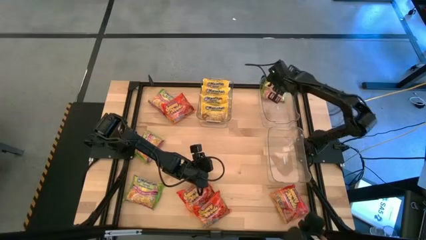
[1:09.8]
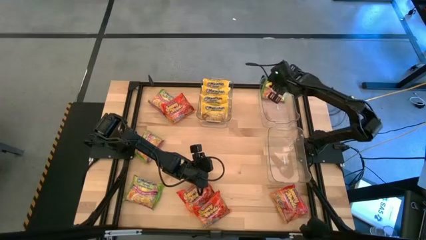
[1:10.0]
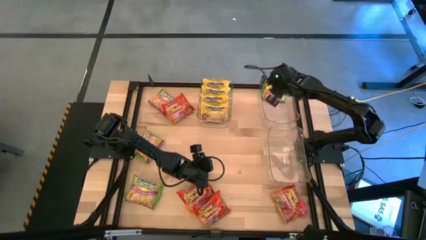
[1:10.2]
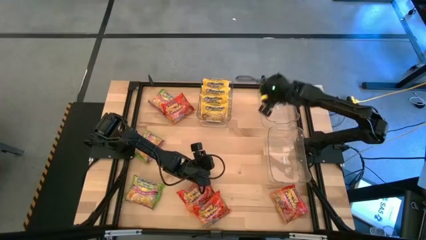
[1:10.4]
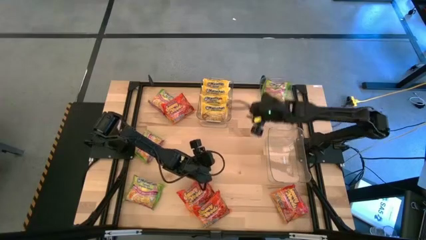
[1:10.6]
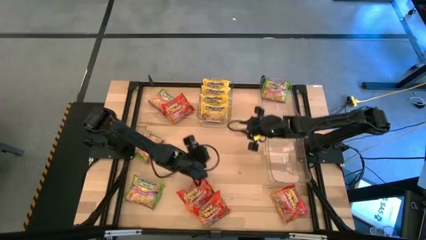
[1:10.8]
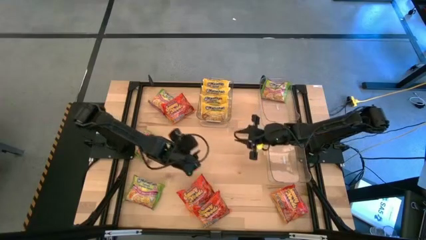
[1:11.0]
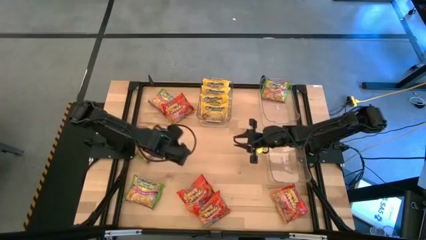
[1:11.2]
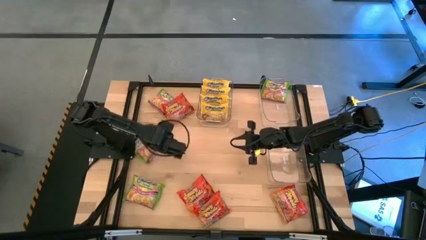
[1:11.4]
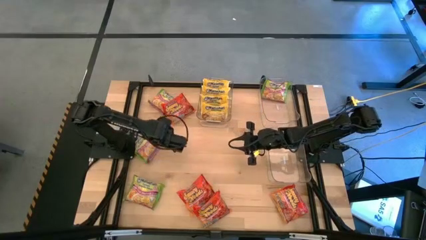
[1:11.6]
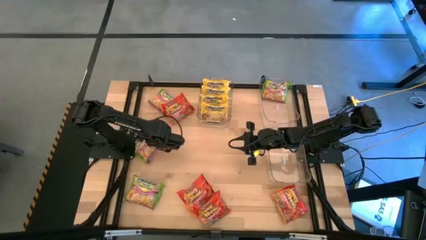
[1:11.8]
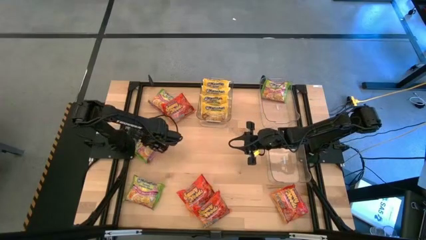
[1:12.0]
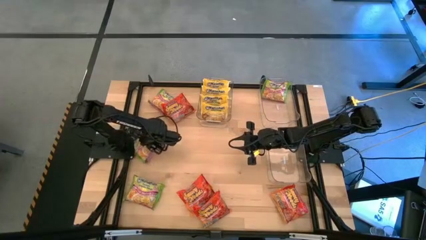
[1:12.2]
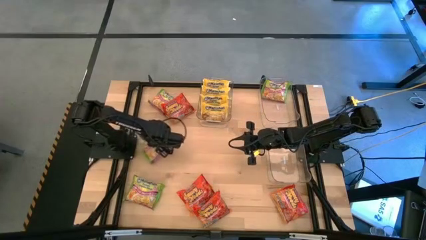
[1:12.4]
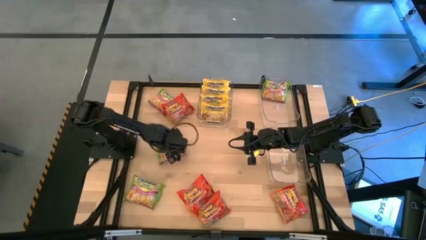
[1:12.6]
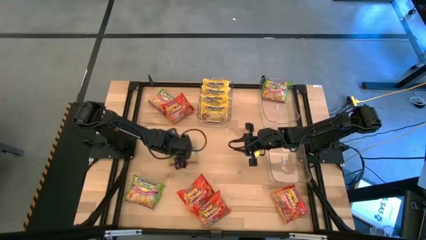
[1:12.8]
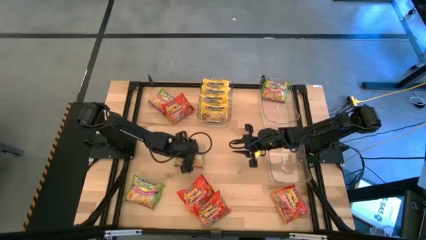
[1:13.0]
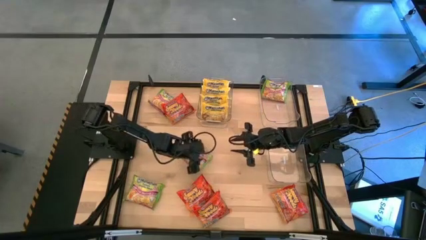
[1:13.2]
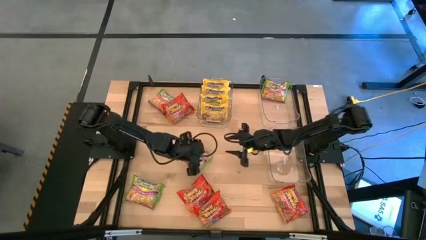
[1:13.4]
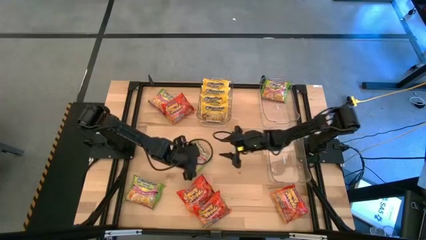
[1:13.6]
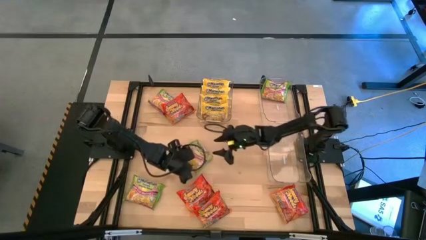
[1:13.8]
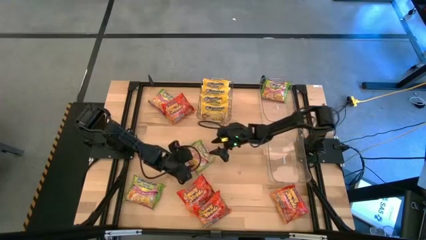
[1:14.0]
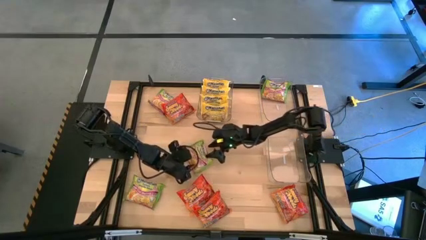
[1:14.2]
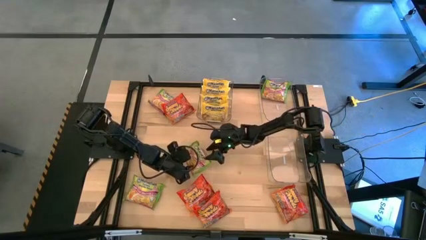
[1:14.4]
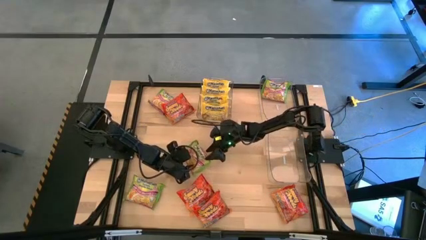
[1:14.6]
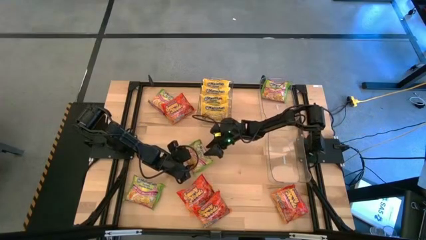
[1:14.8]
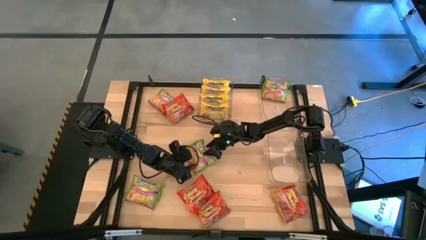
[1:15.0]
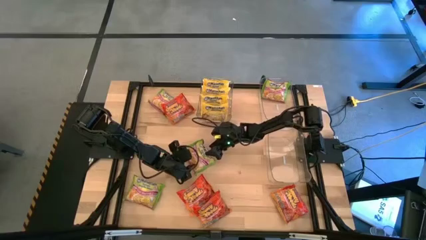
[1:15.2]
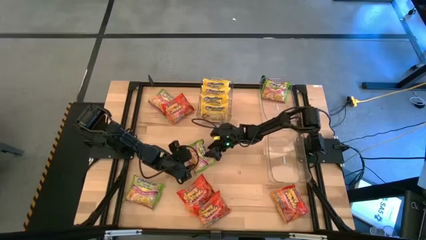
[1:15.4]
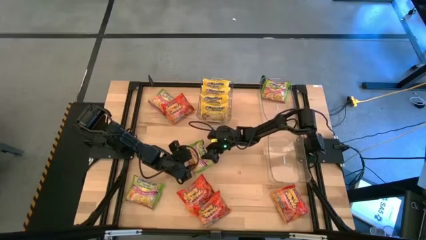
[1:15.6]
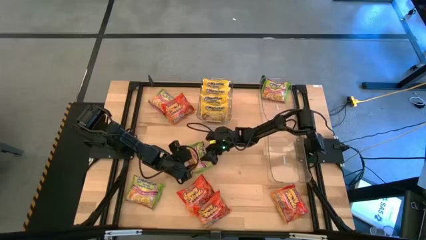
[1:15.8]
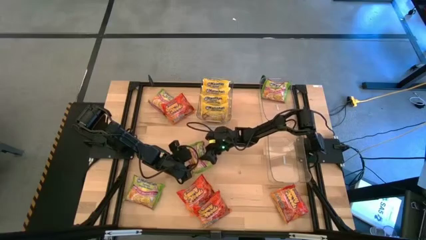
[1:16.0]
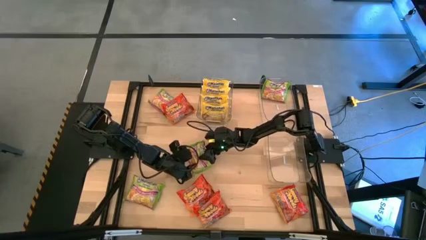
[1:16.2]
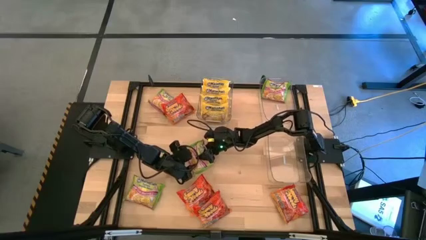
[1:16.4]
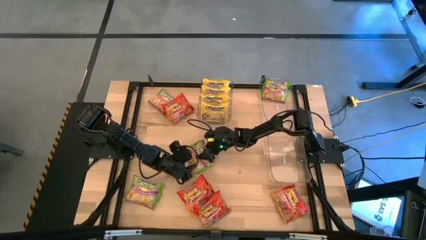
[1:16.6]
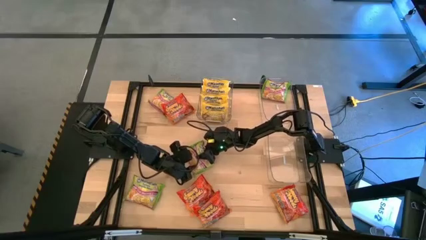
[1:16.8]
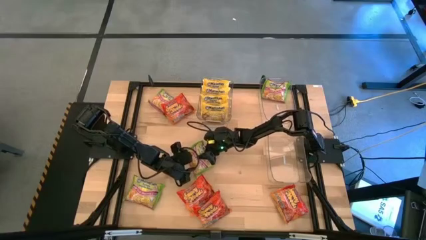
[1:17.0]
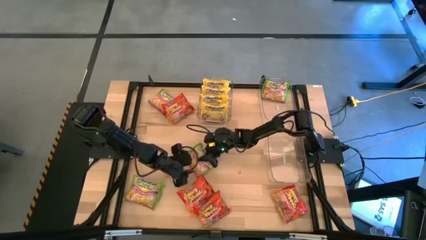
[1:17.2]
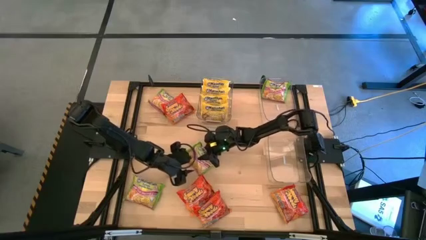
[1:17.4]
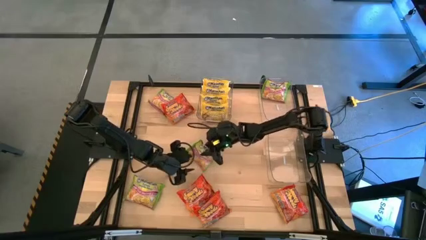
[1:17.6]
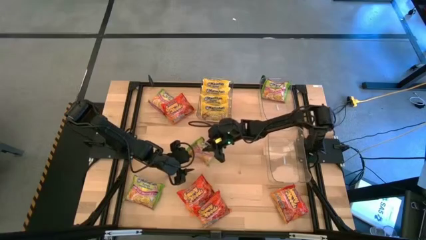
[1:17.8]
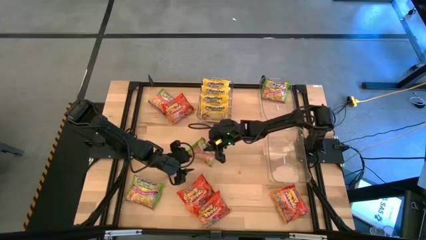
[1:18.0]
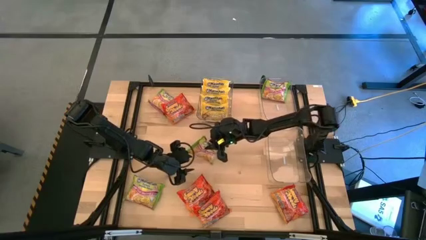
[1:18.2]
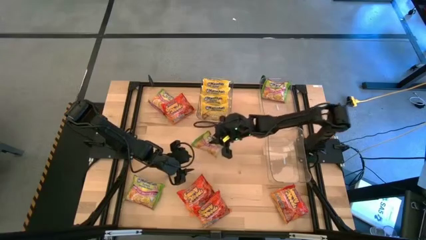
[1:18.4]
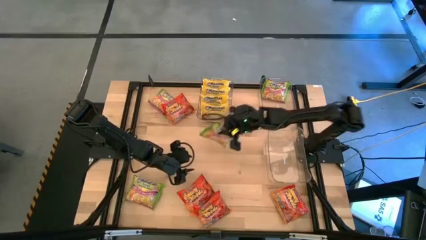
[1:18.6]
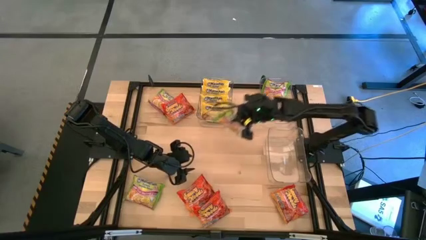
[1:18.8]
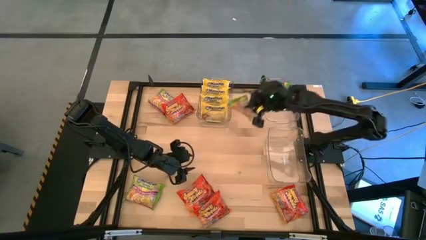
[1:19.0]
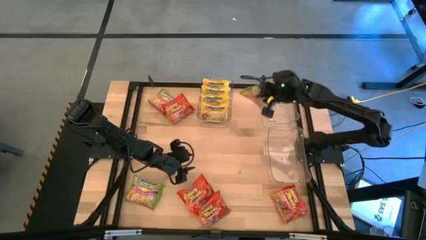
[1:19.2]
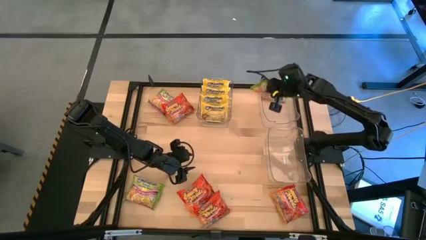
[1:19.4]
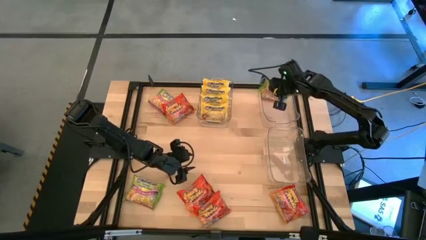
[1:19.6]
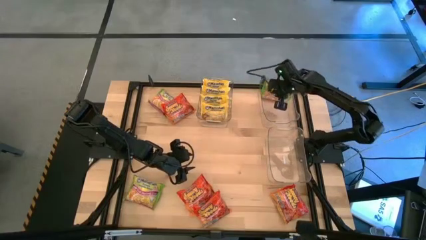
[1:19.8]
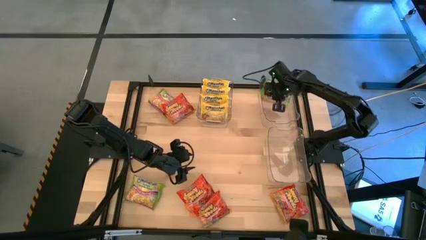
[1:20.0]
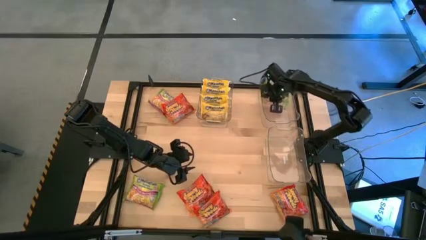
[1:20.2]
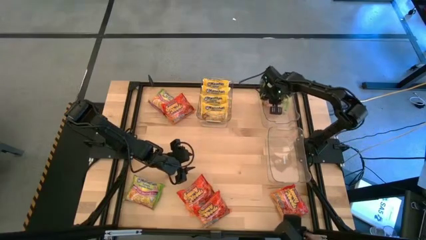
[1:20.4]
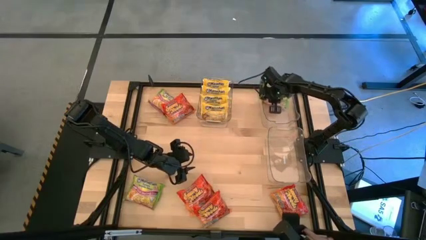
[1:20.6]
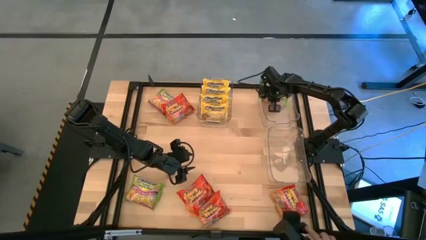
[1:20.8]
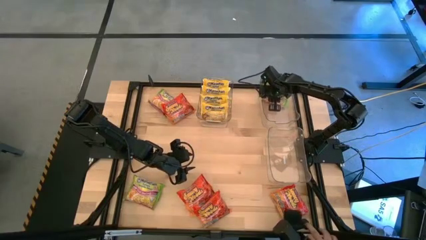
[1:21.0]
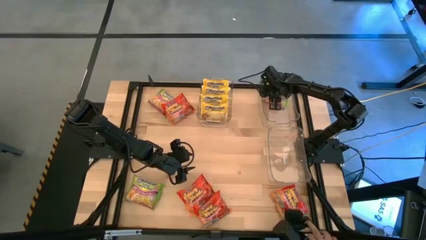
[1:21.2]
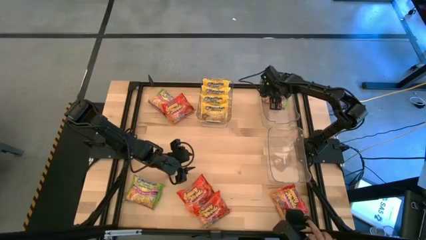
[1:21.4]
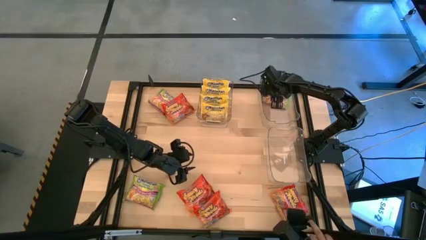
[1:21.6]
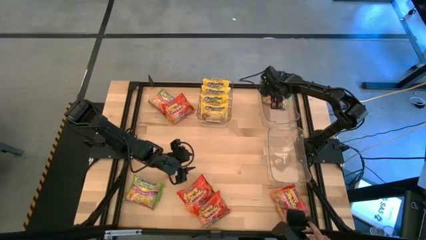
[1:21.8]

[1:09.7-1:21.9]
Task: Sort Maruchan noodles
Put the green noodle pack into the top right transparent bin
